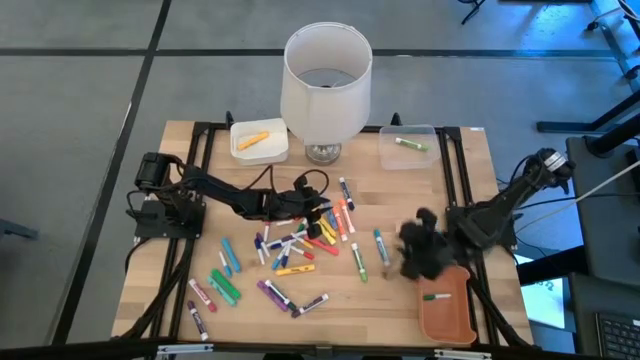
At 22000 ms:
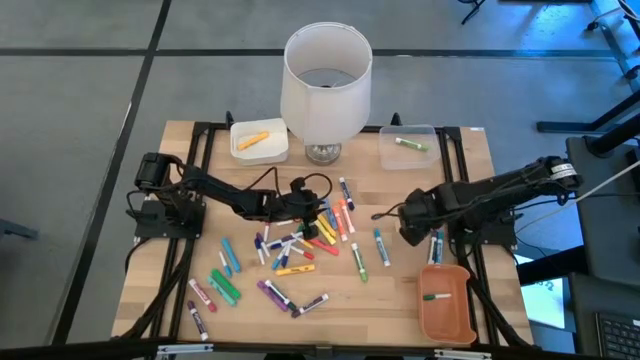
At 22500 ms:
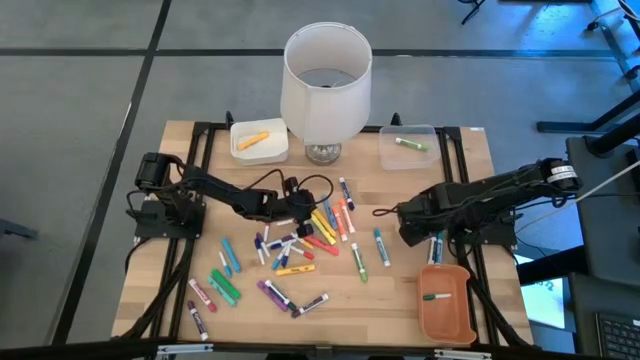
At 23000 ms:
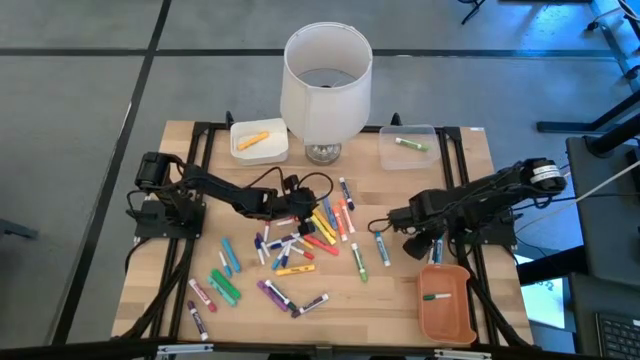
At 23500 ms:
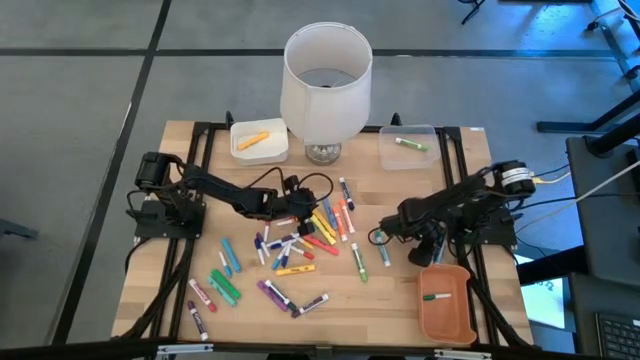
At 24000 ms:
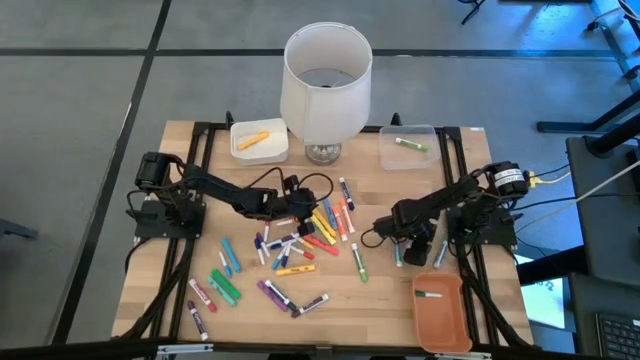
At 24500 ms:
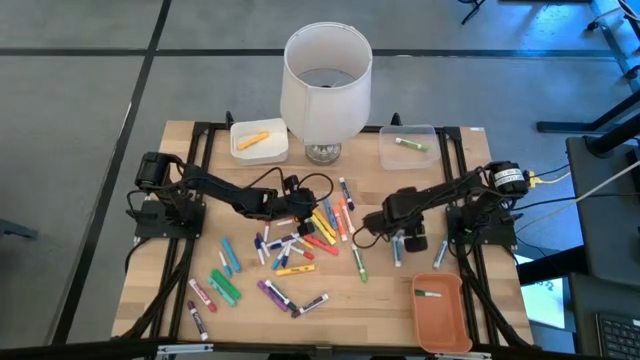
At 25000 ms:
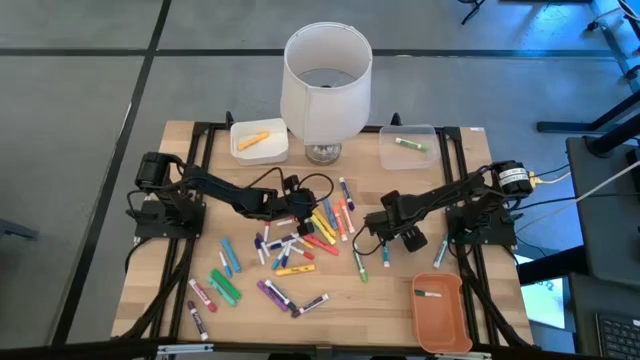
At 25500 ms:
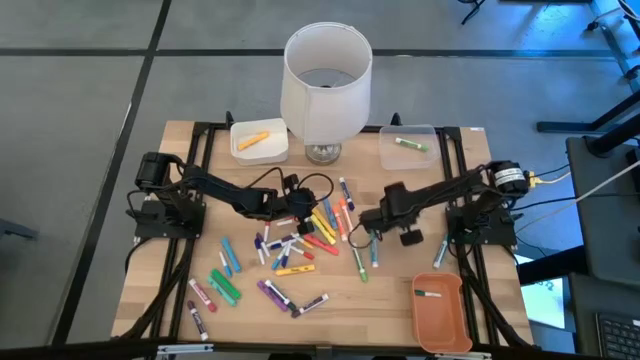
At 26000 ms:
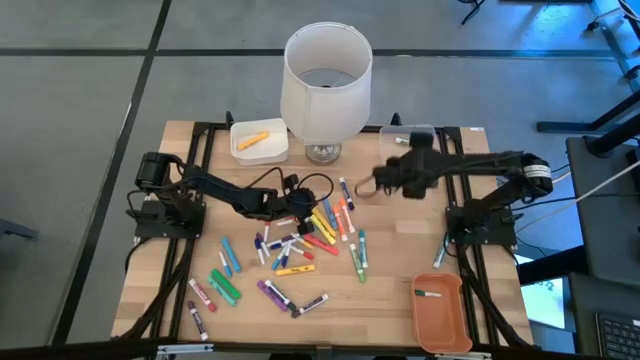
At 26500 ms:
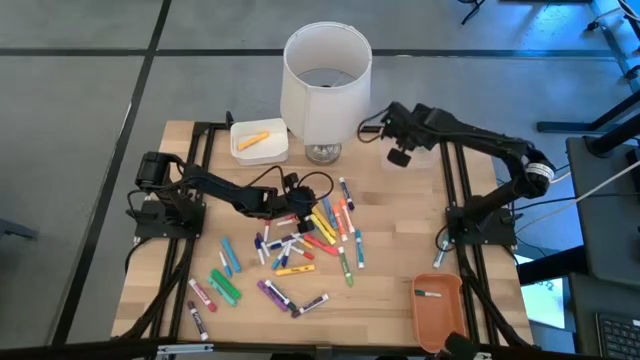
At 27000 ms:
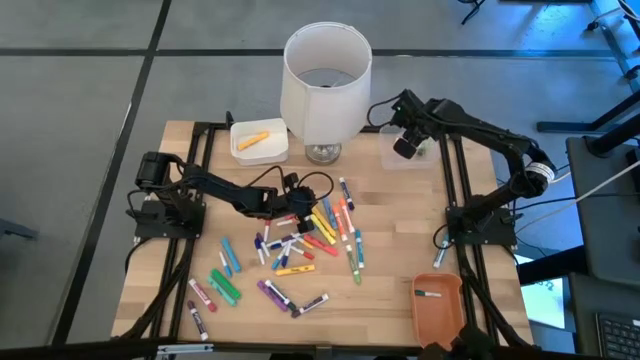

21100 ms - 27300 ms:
Task: Pick & Place Markers
Put the thick purple dry erase marker into the transparent bin

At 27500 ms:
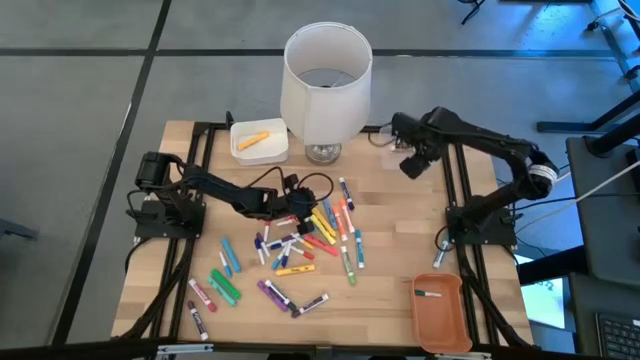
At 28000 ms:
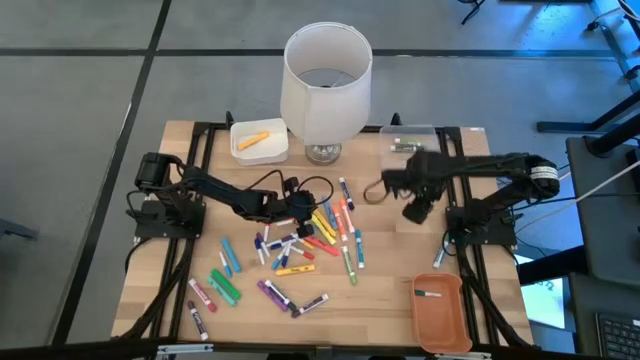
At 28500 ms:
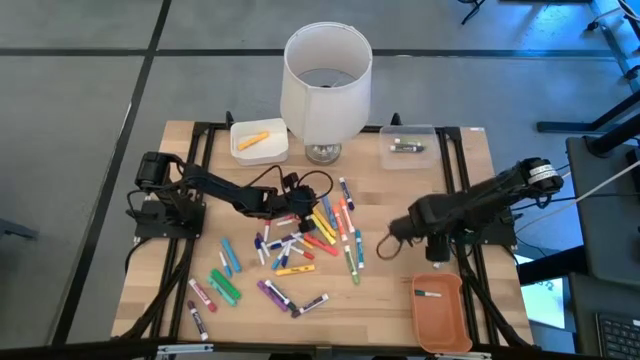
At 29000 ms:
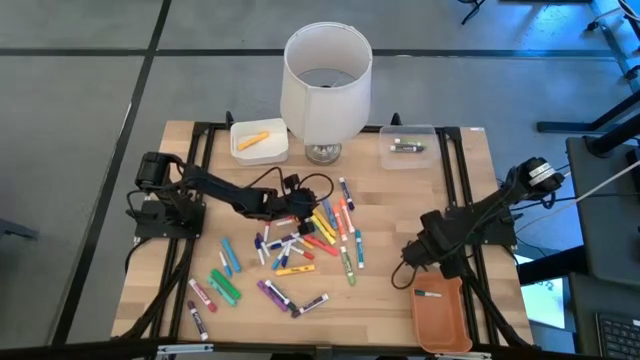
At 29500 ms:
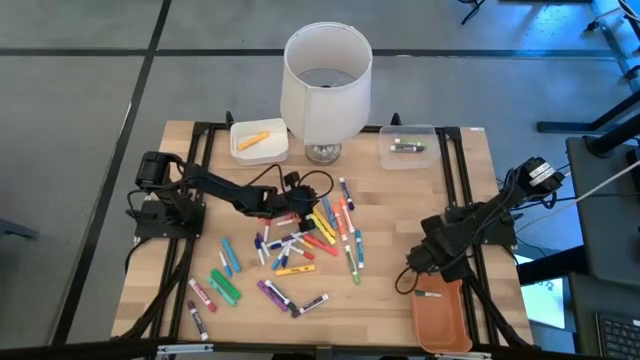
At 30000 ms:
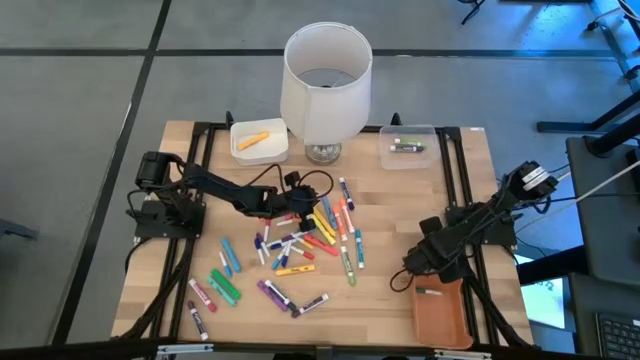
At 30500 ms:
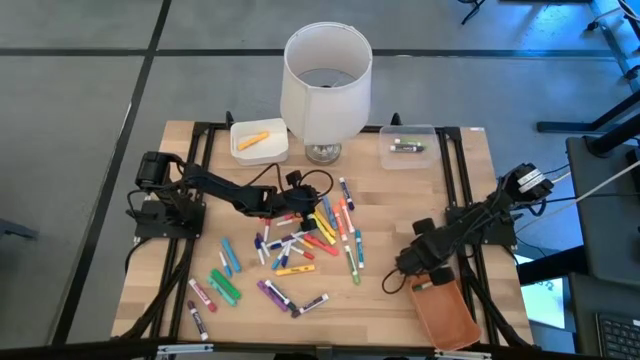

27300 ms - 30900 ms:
Put the thick light blue dry erase marker into the transparent bin

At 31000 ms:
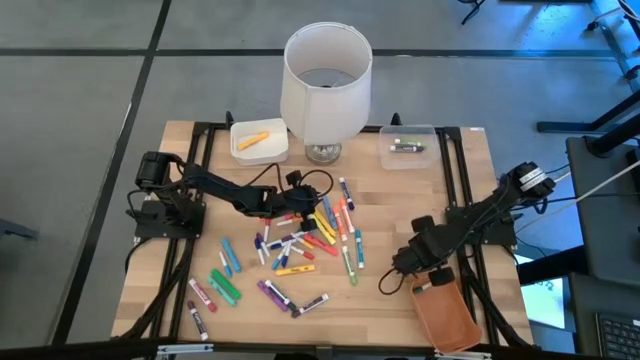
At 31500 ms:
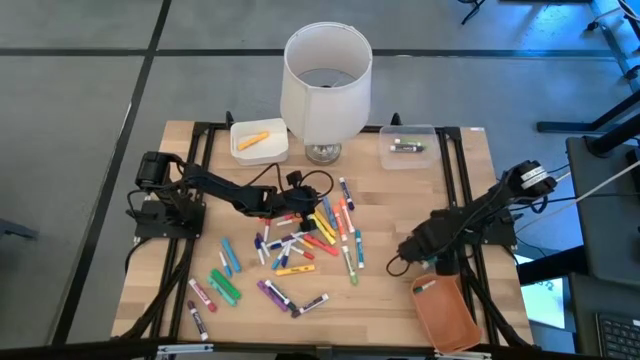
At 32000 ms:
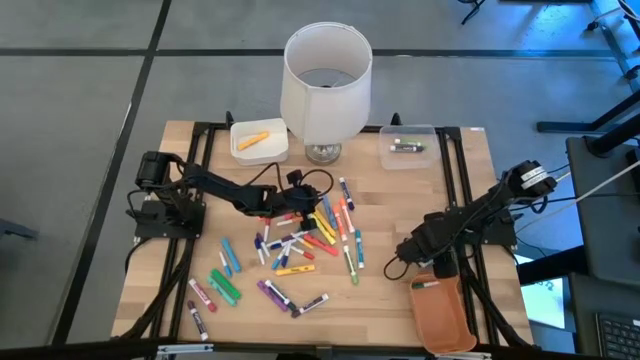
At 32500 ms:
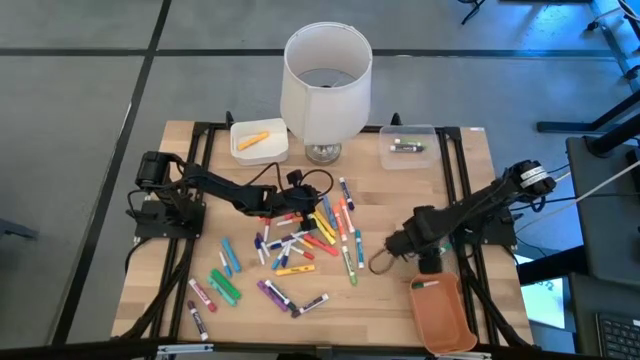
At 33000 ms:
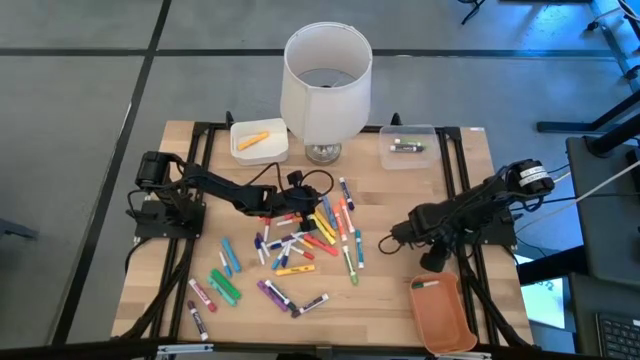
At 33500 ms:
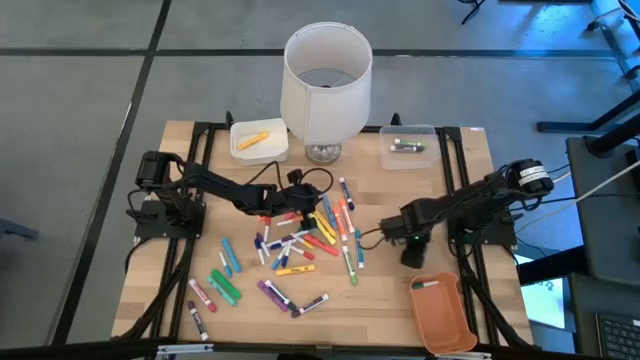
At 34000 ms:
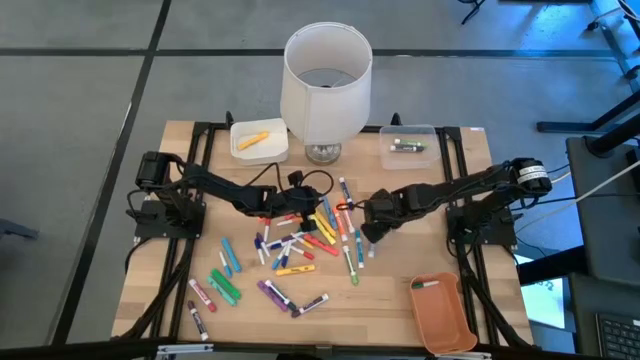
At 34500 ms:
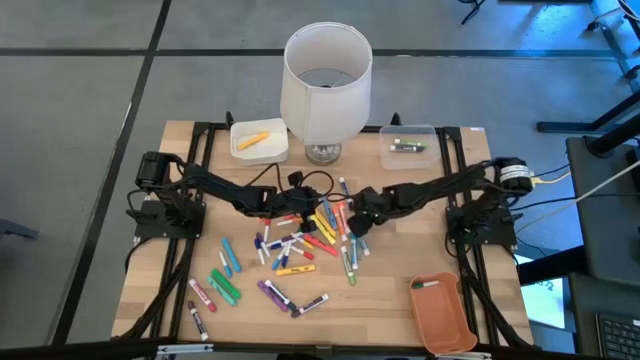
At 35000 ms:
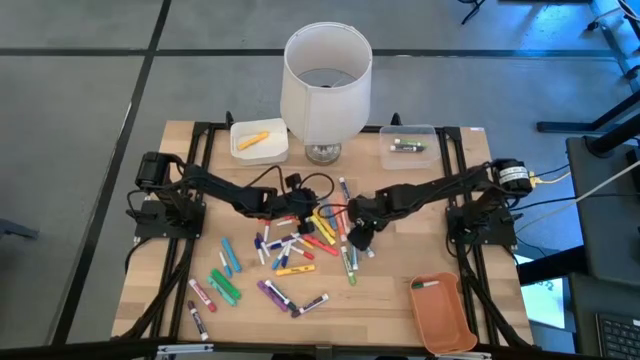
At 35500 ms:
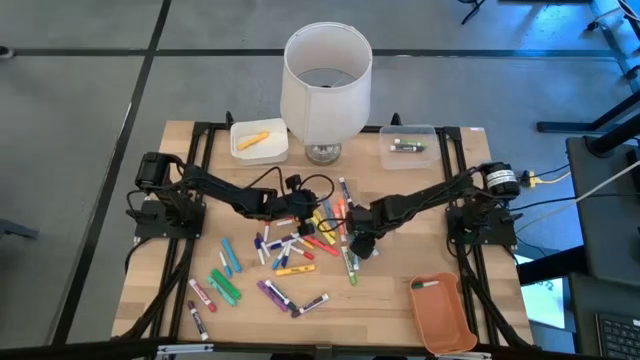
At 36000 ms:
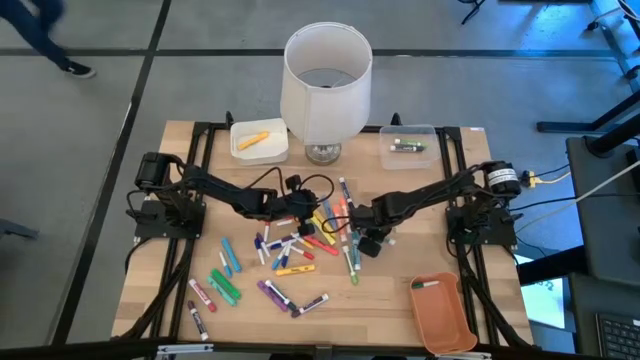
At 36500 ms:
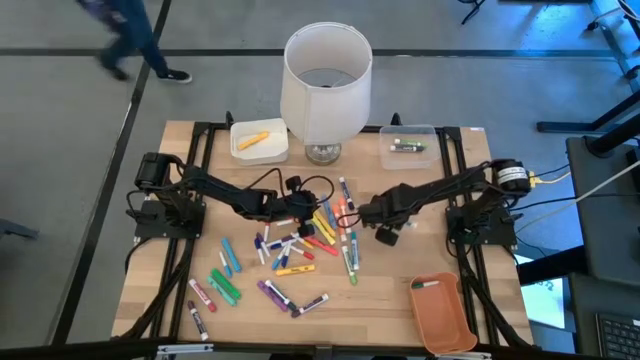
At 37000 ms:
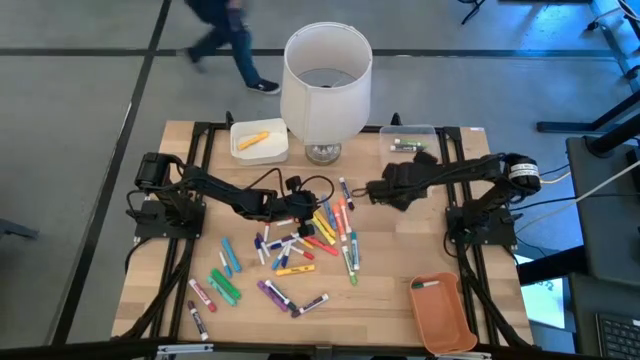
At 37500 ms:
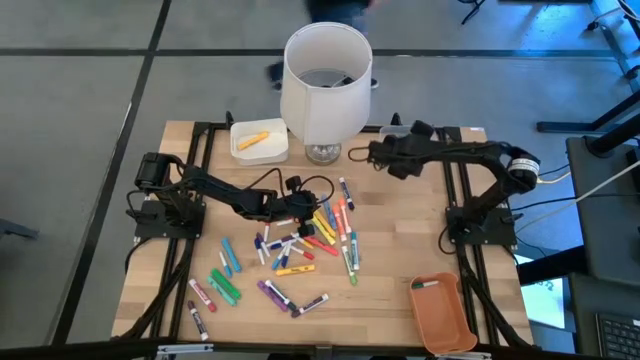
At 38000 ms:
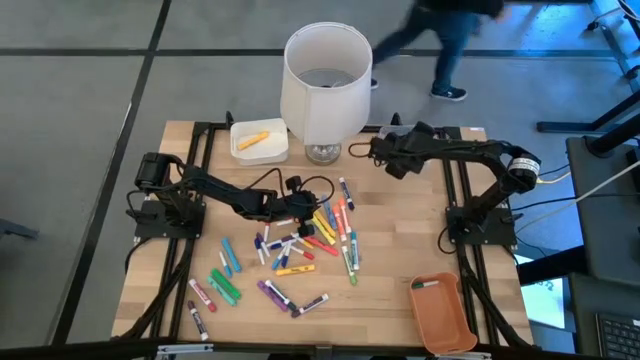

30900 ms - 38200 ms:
Put the thick light blue dry erase marker into the transparent bin

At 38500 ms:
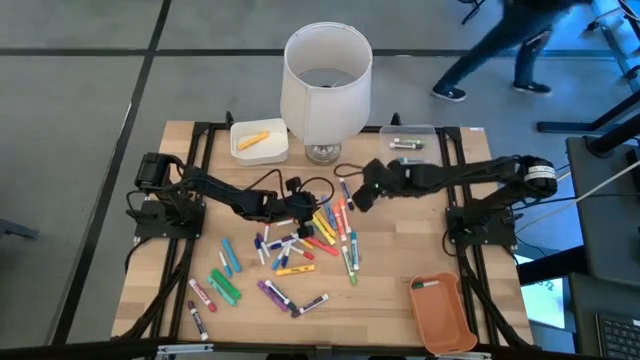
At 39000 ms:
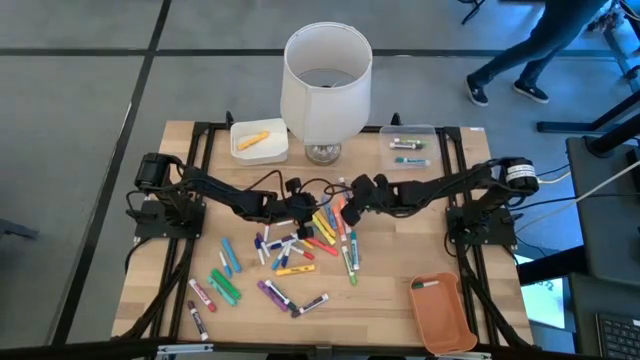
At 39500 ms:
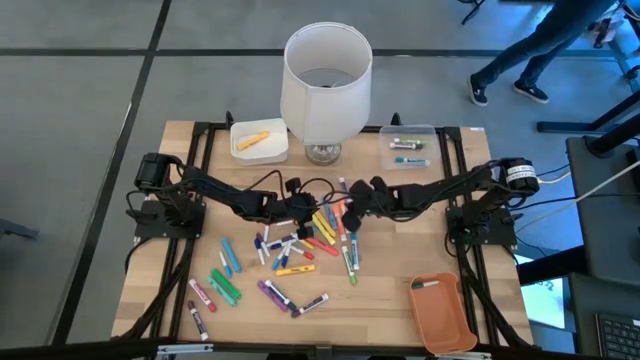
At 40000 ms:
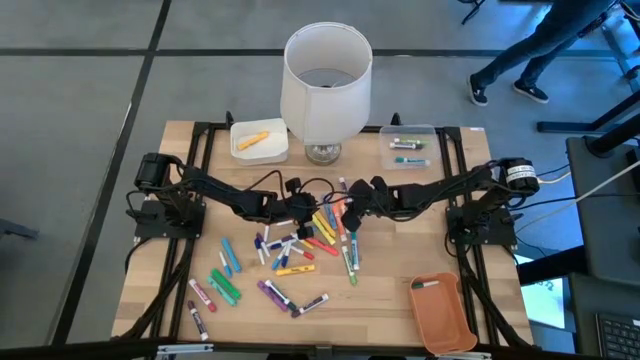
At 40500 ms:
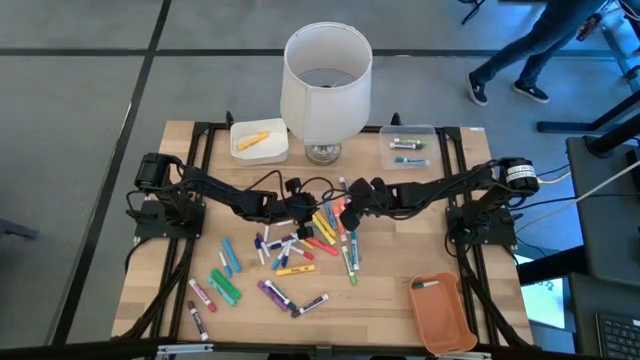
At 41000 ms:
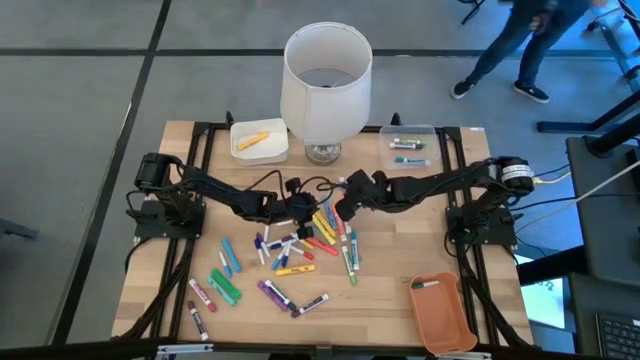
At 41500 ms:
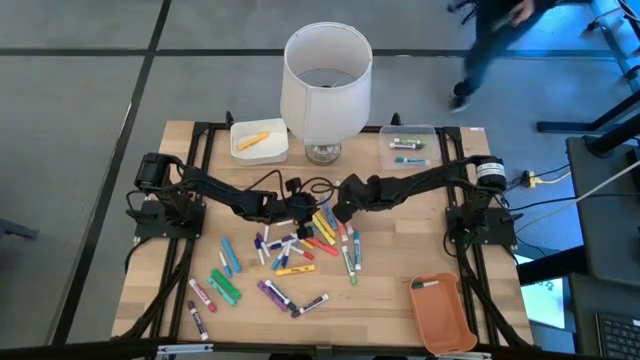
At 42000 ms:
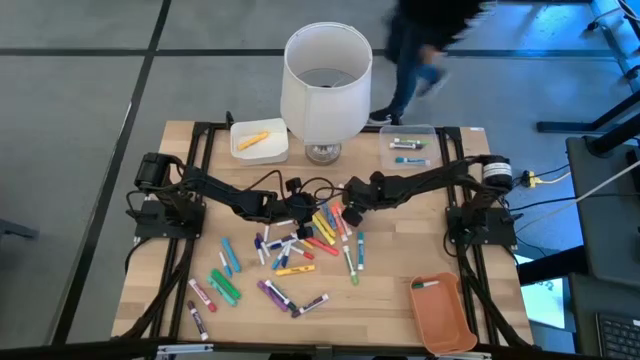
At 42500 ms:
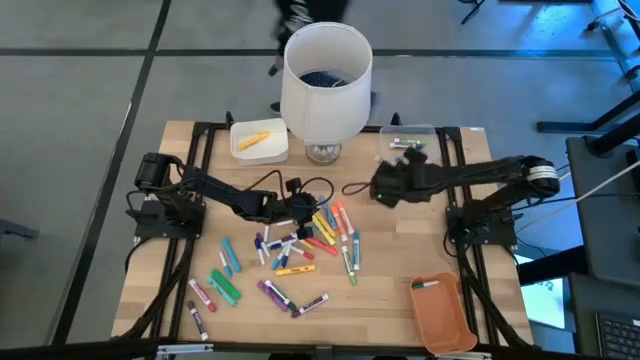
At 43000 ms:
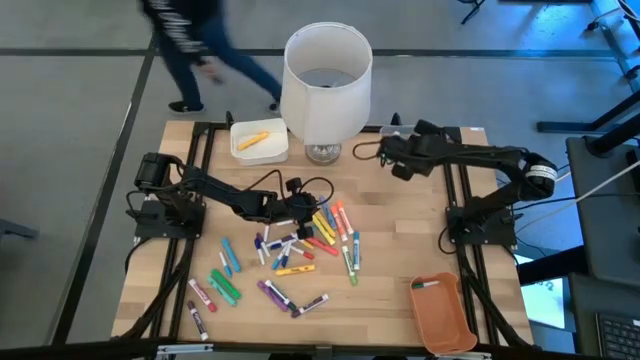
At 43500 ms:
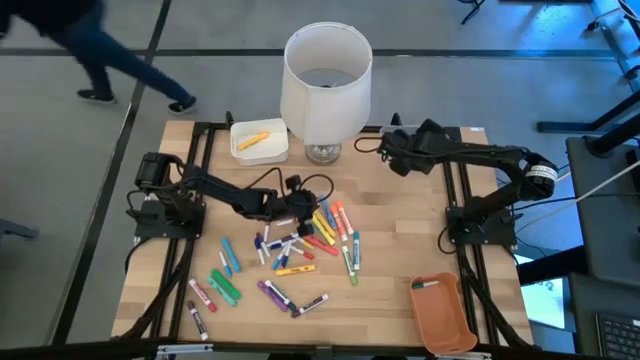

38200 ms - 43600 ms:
Put the thick dark blue dry erase marker into the transparent bin
